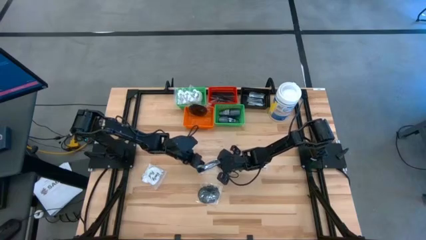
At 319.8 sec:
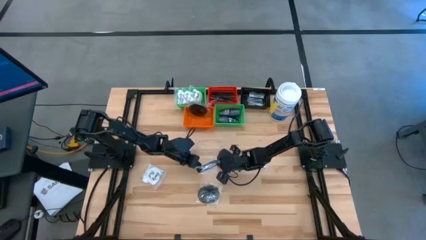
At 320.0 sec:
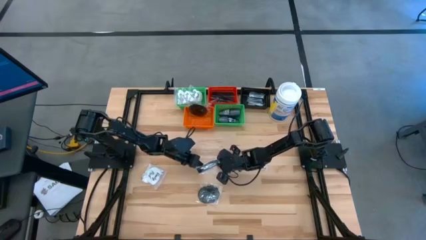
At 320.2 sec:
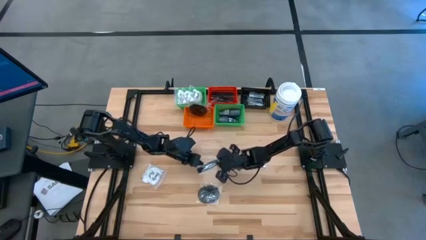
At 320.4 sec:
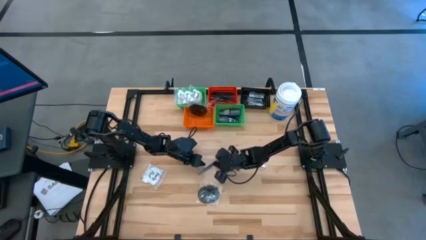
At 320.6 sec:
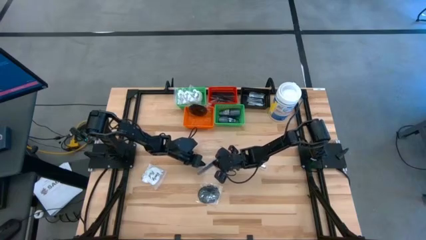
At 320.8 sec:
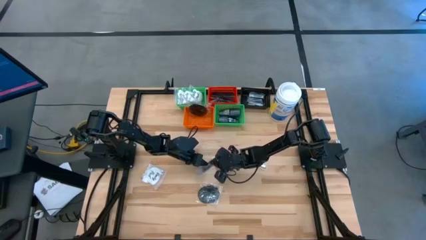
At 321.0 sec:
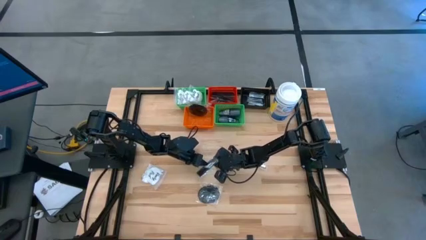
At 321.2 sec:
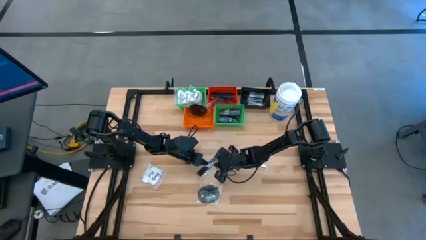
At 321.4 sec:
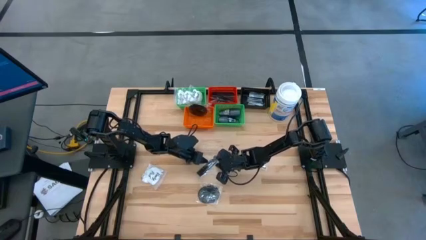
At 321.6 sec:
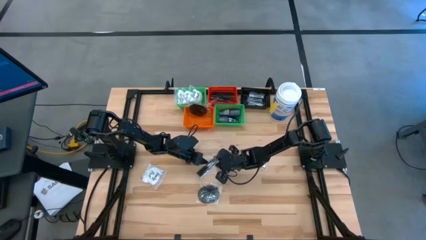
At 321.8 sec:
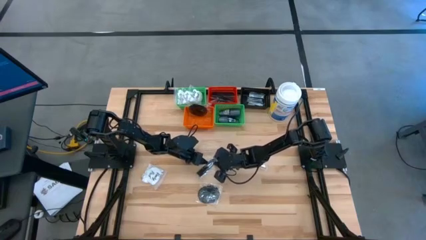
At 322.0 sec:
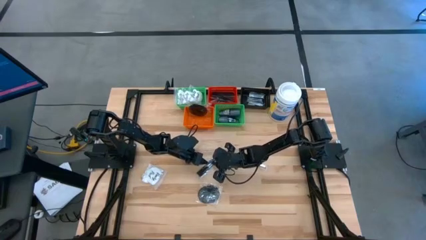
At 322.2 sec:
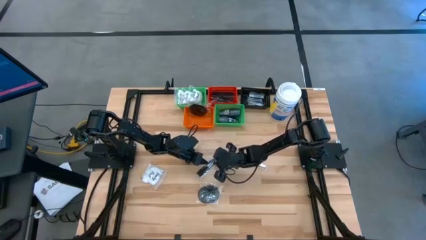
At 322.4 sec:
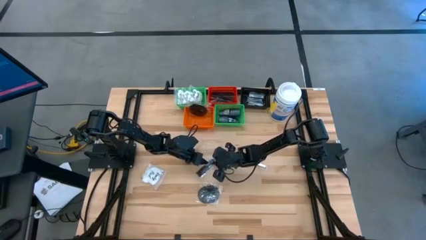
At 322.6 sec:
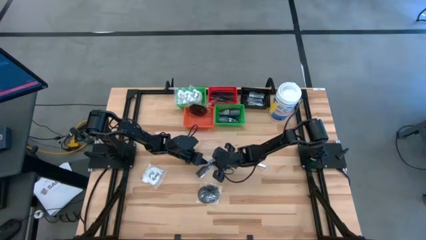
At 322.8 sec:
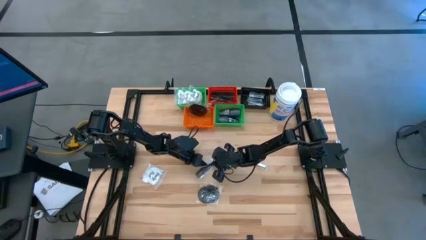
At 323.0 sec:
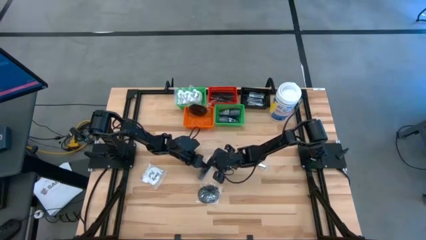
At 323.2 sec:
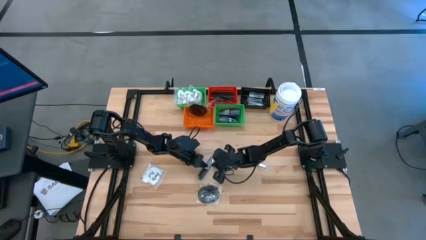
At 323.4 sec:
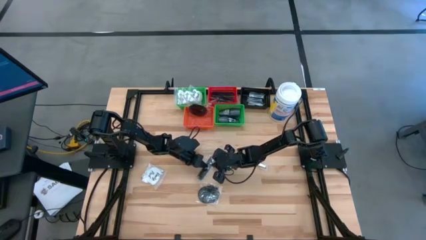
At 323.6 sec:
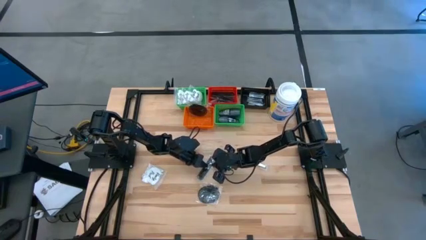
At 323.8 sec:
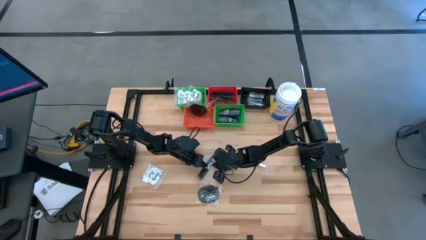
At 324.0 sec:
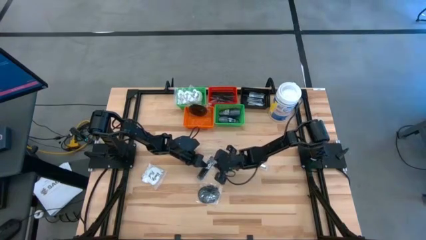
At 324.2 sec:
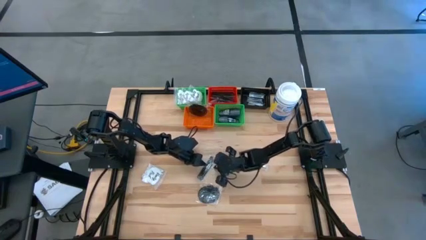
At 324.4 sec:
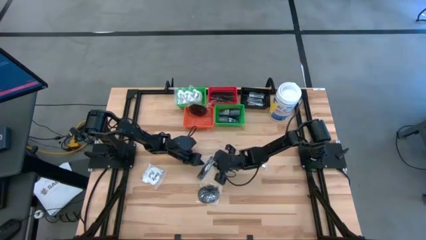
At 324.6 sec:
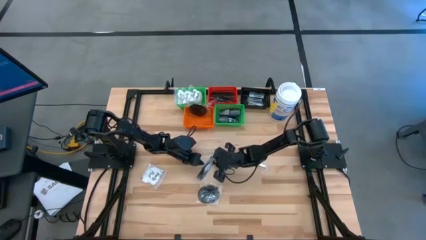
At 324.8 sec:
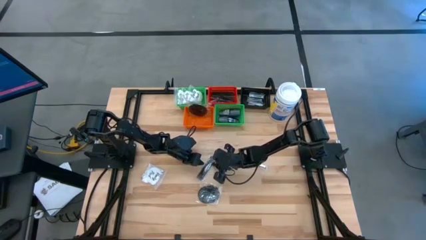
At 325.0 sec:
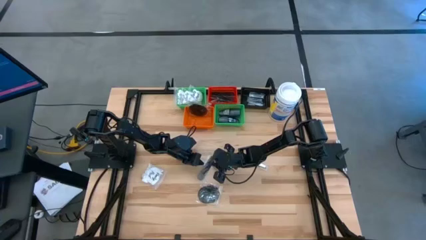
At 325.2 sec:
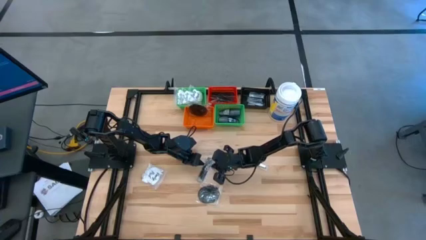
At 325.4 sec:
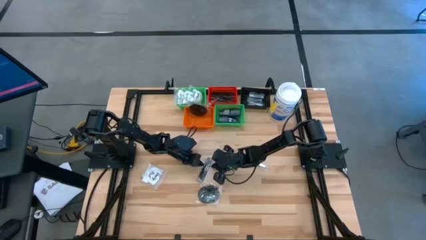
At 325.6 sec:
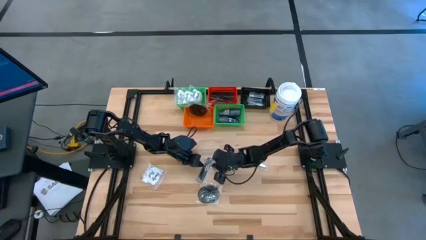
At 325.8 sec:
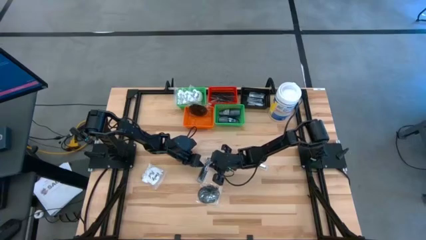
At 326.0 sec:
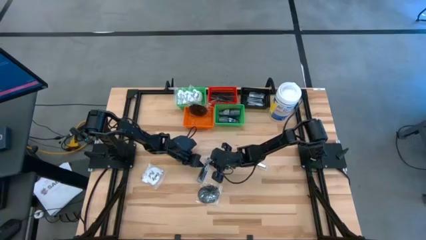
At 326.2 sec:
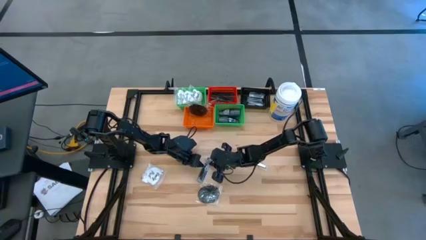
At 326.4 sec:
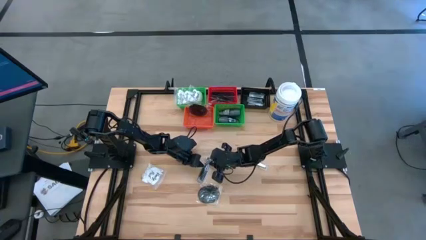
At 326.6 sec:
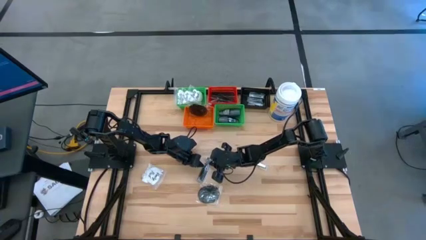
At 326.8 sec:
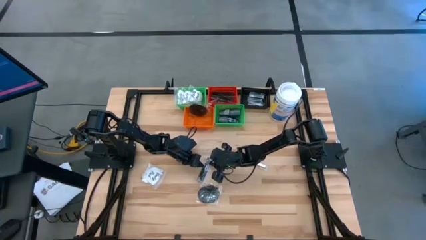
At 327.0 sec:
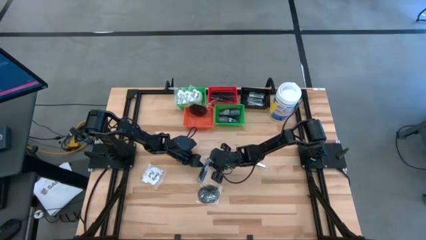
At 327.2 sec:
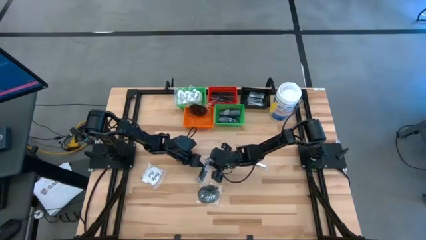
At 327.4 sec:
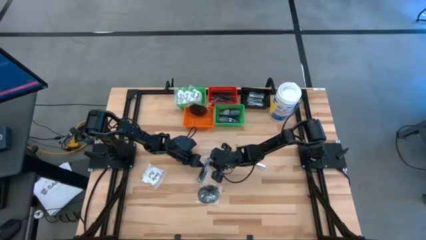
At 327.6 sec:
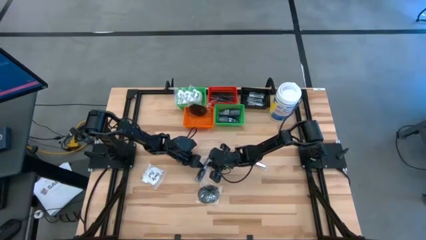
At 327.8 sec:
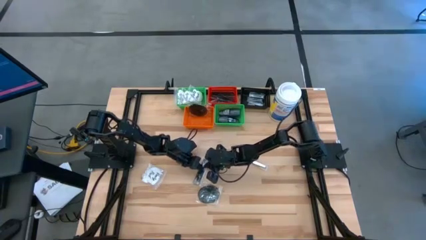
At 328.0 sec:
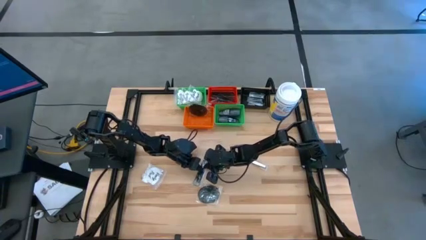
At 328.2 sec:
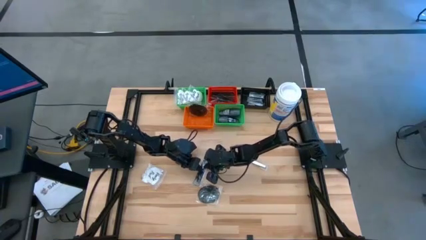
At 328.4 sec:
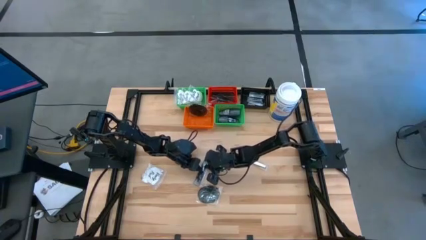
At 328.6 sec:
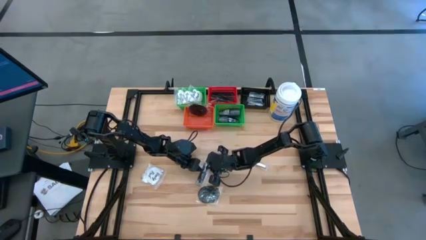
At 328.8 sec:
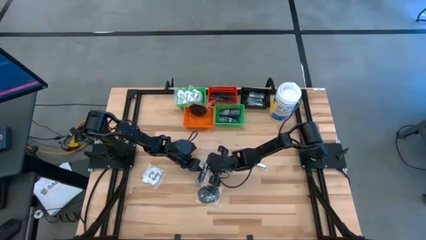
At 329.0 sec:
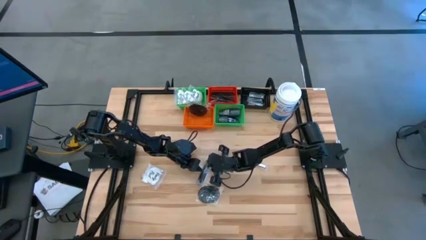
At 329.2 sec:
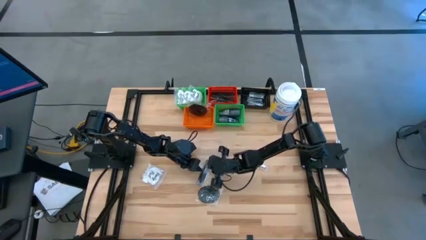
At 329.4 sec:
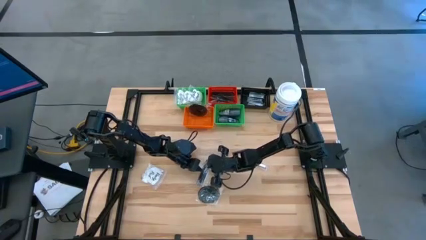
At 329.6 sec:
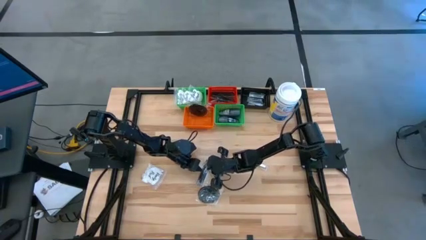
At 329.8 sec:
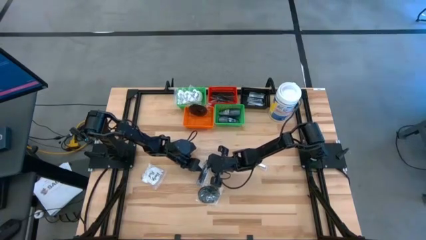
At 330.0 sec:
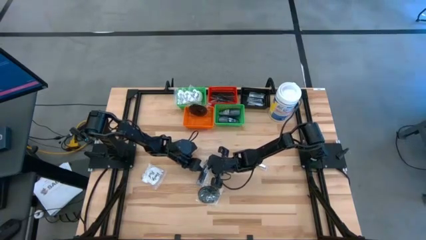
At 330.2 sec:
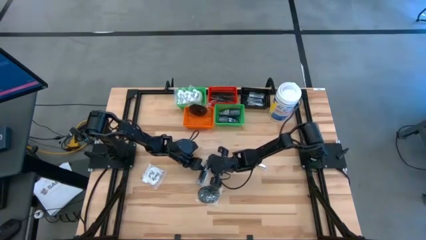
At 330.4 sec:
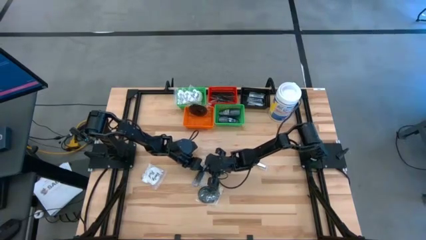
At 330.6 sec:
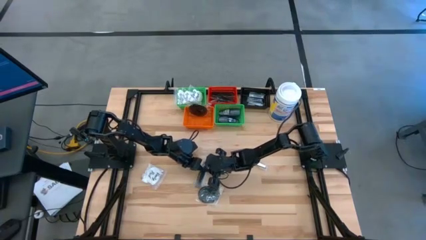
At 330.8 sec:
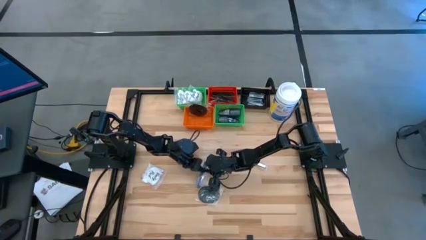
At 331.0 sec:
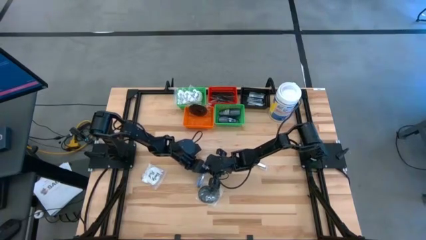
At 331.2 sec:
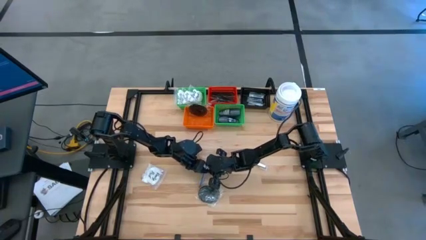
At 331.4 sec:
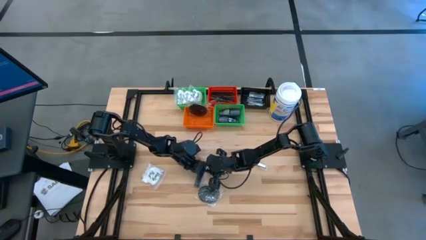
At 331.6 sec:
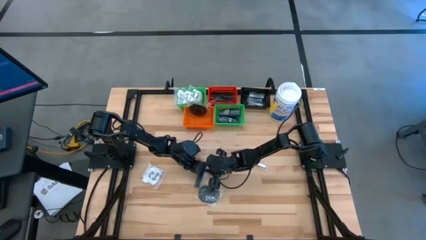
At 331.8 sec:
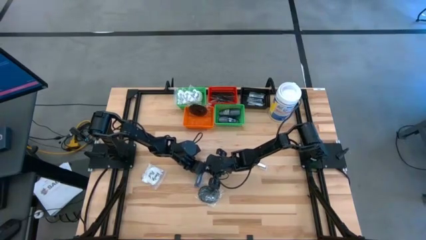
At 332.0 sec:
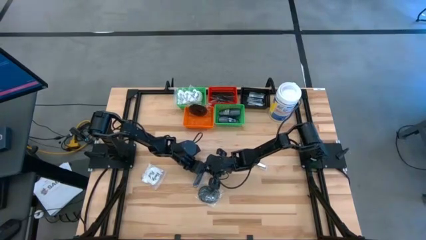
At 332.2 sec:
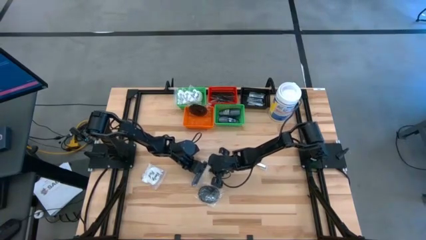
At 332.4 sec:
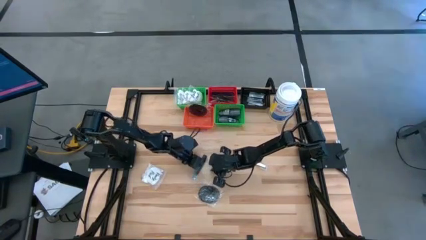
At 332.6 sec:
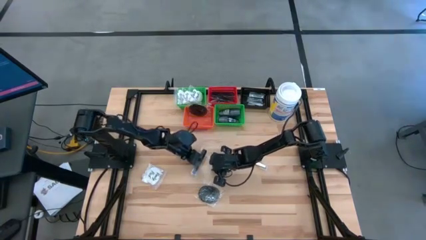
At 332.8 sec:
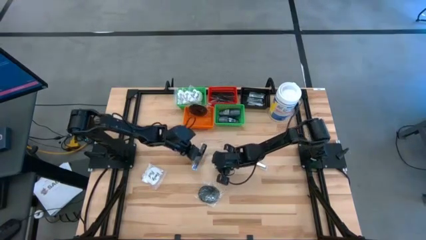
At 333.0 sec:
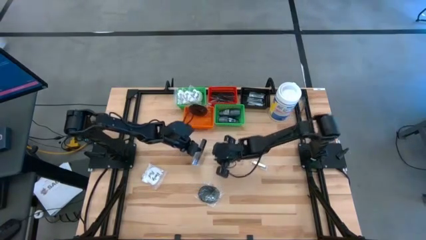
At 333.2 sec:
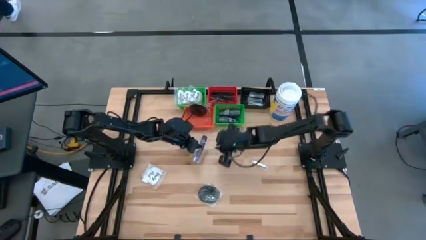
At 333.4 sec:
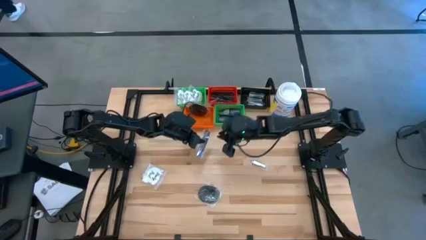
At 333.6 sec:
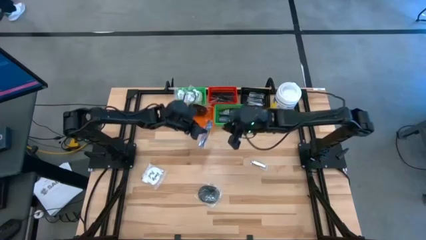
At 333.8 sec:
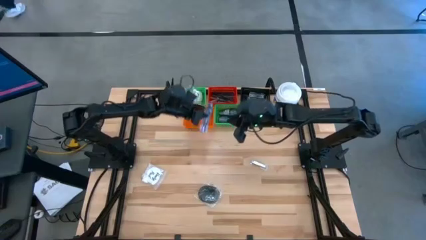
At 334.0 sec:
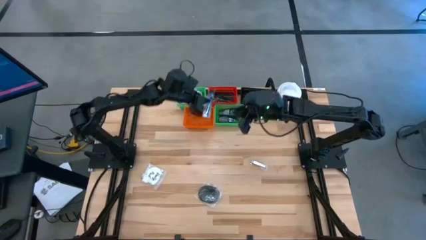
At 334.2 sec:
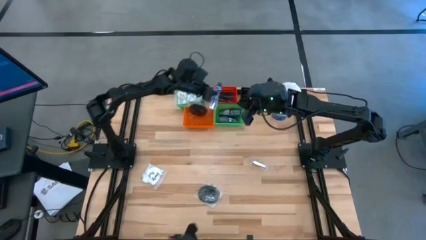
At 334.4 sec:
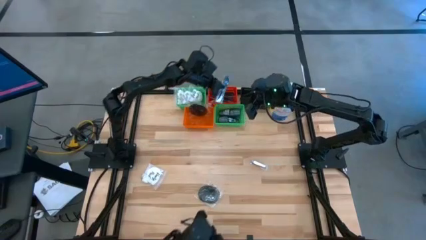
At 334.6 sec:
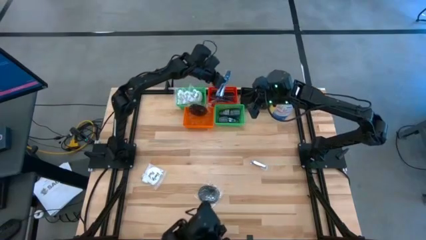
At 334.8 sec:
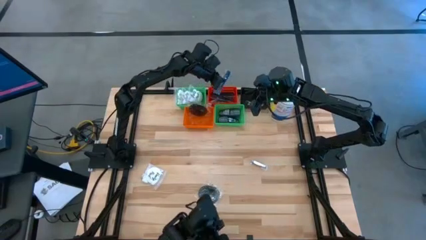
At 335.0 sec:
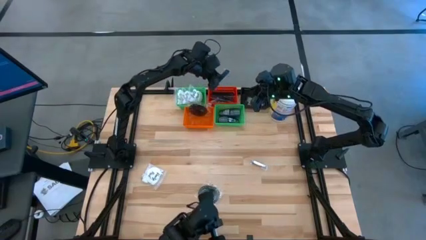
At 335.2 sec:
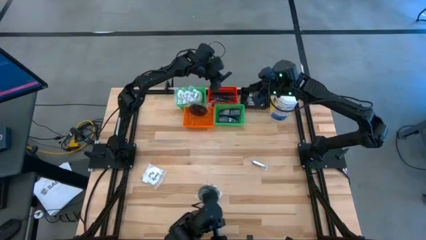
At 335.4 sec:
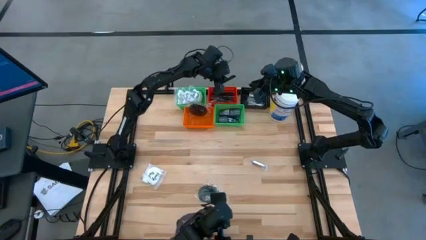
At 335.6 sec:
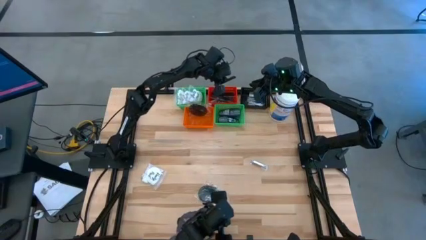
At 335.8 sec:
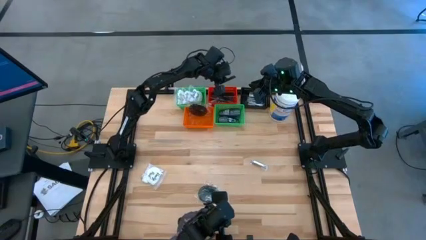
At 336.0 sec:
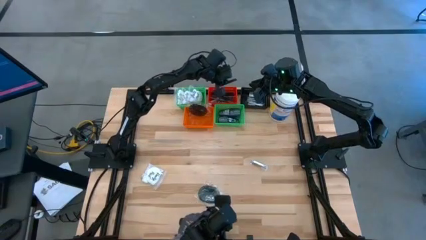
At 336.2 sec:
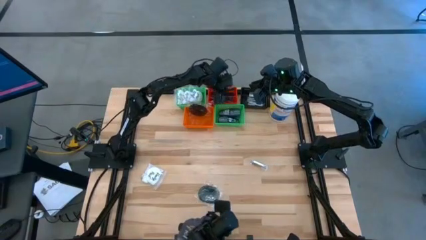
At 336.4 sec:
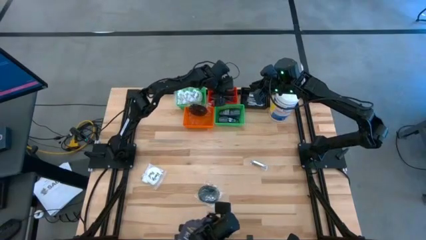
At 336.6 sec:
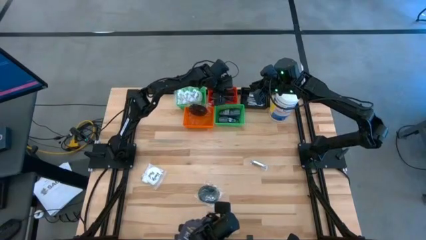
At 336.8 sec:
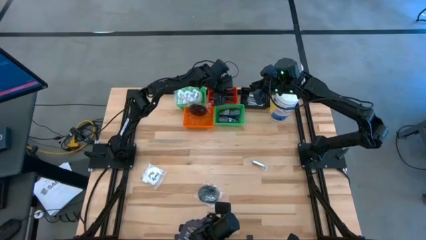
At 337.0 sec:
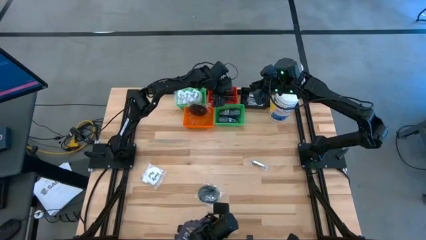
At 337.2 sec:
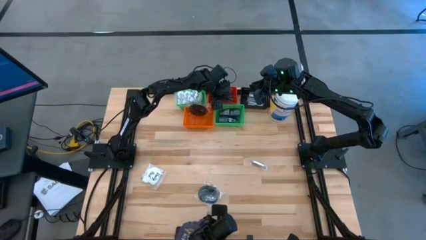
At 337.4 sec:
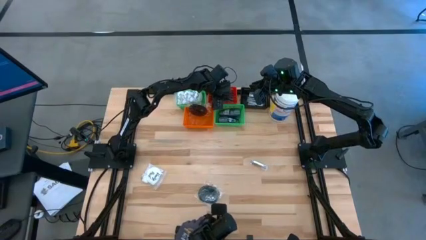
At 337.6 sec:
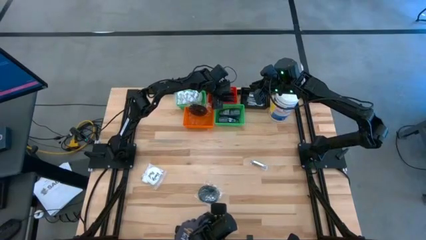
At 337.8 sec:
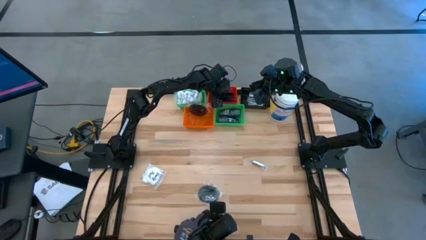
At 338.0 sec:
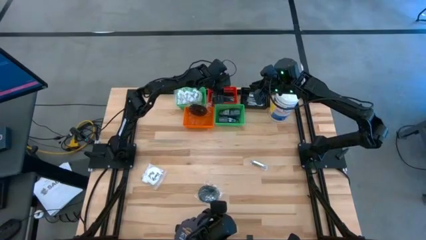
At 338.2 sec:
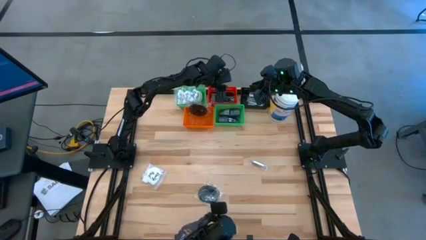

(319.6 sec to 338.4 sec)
Task: Pick & Place Travel size toiletries
Put the black comb into the red bin
